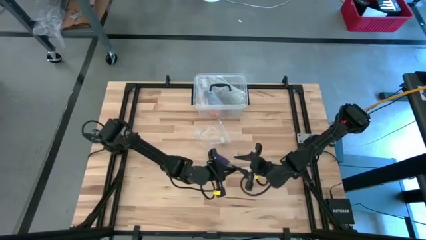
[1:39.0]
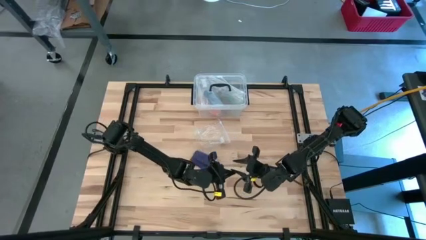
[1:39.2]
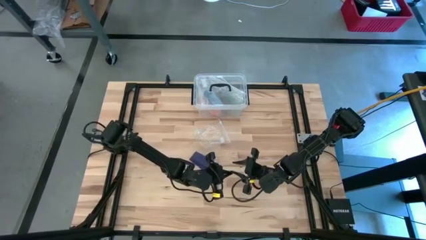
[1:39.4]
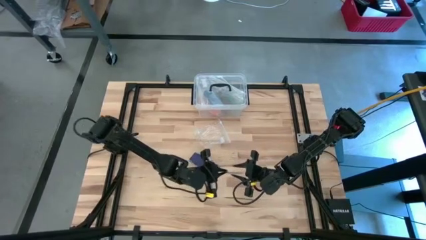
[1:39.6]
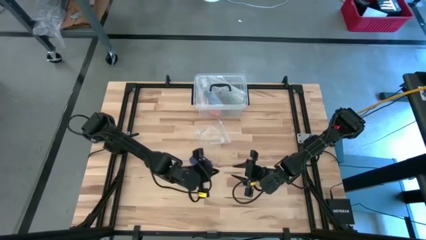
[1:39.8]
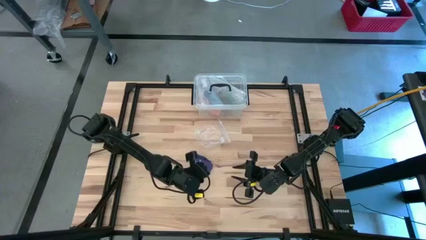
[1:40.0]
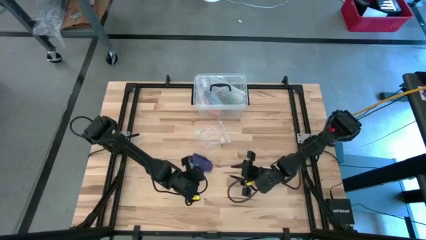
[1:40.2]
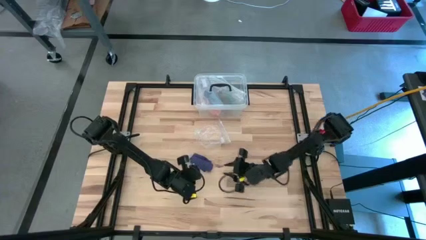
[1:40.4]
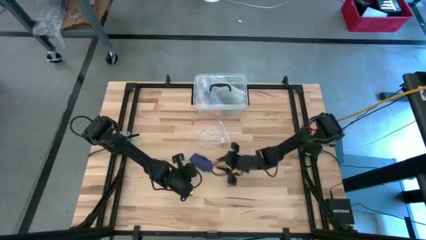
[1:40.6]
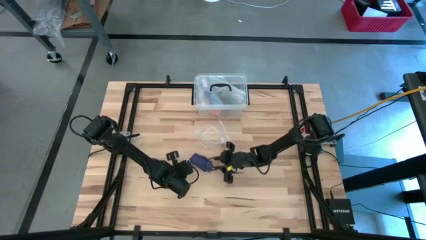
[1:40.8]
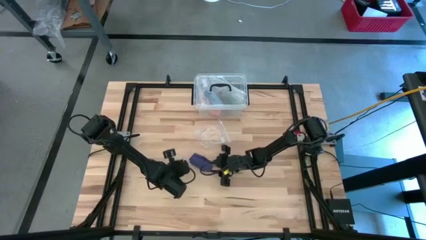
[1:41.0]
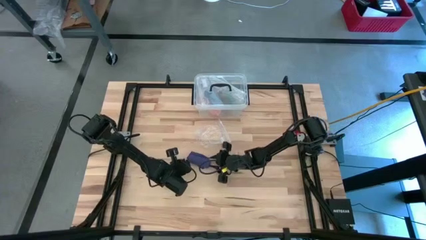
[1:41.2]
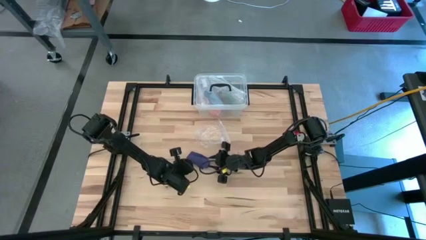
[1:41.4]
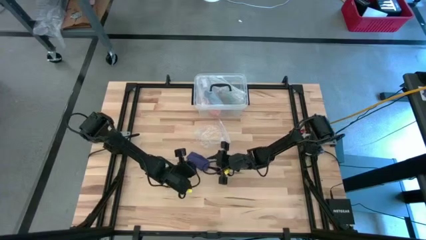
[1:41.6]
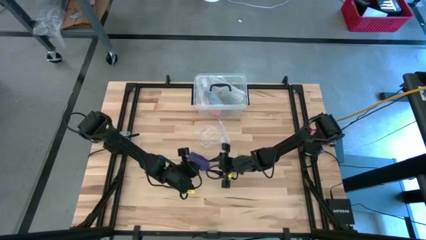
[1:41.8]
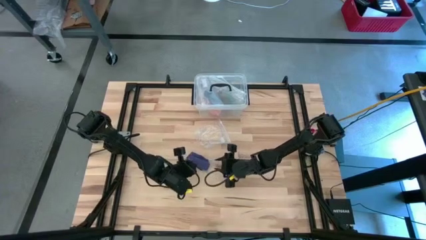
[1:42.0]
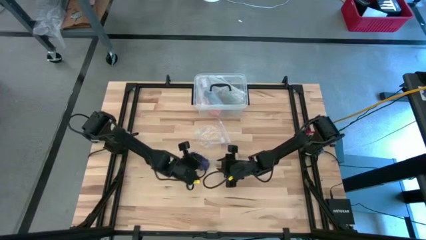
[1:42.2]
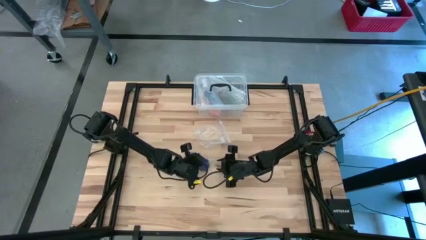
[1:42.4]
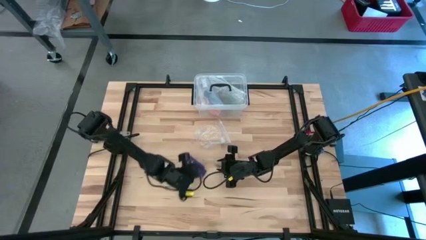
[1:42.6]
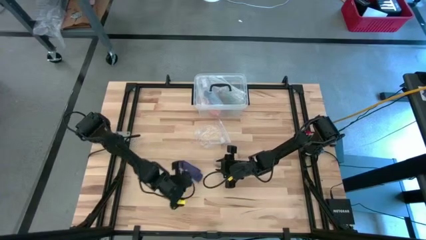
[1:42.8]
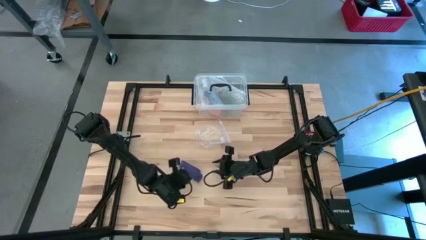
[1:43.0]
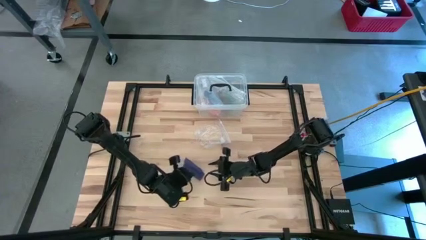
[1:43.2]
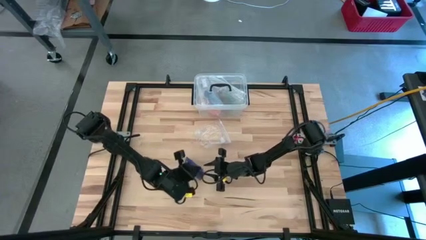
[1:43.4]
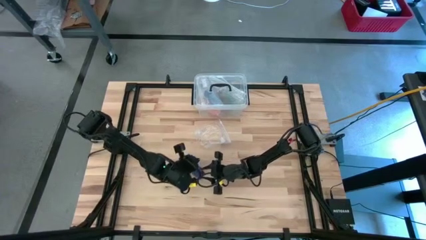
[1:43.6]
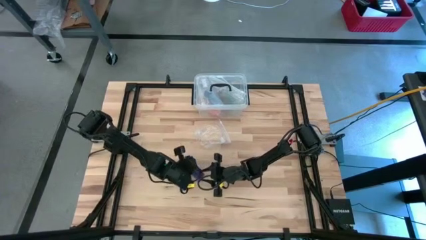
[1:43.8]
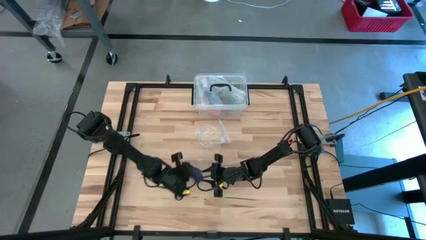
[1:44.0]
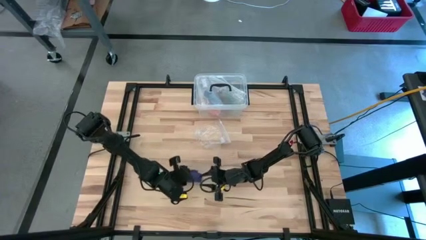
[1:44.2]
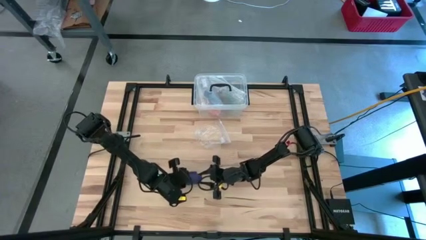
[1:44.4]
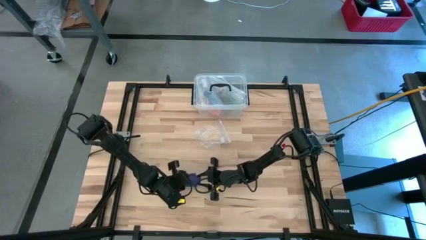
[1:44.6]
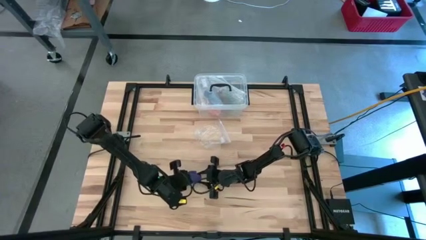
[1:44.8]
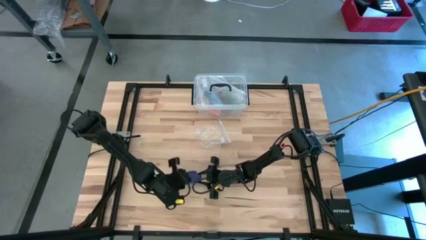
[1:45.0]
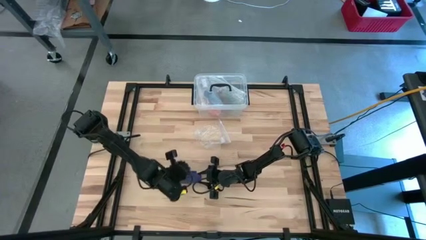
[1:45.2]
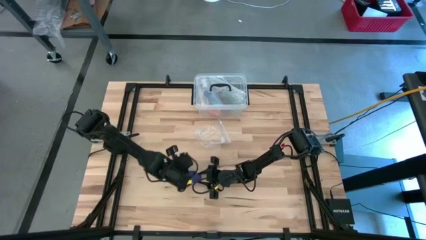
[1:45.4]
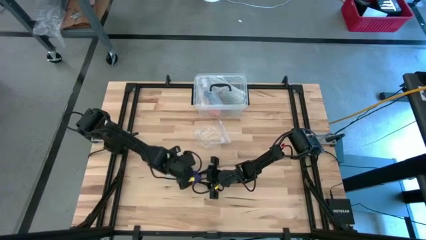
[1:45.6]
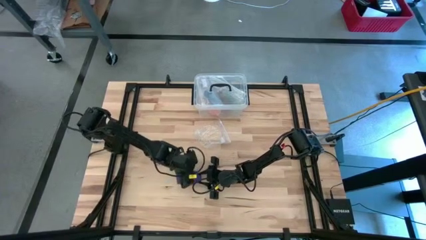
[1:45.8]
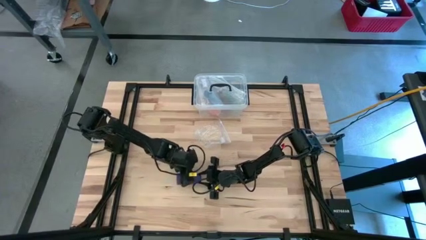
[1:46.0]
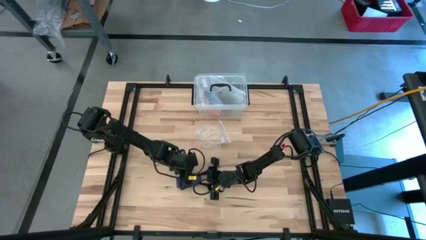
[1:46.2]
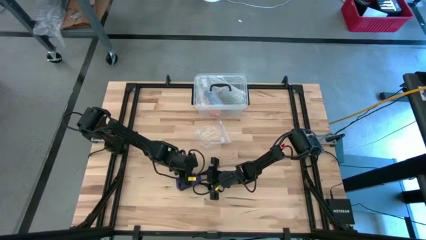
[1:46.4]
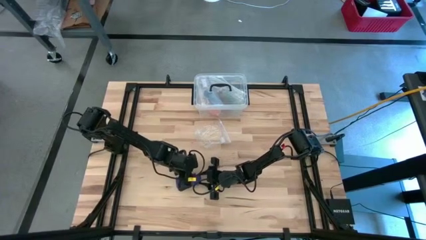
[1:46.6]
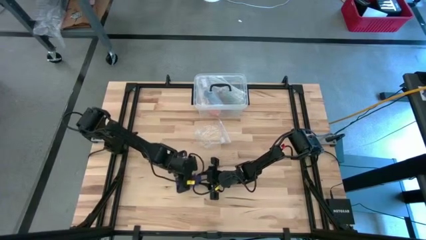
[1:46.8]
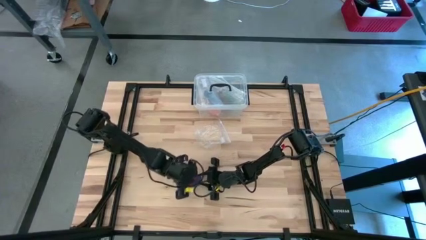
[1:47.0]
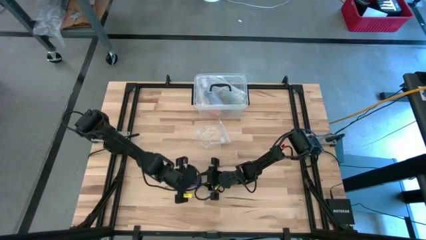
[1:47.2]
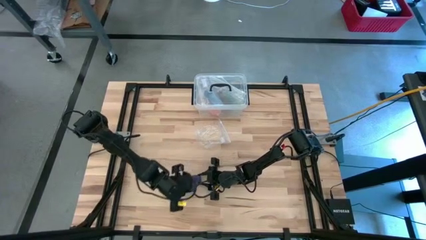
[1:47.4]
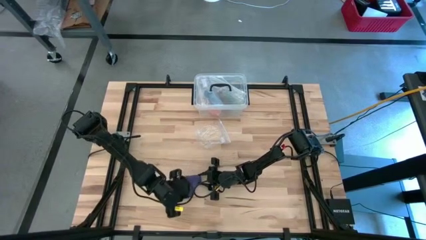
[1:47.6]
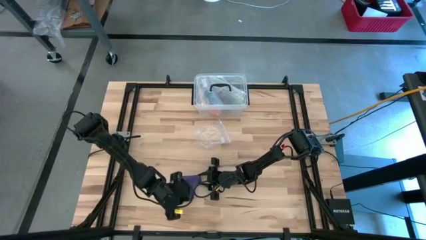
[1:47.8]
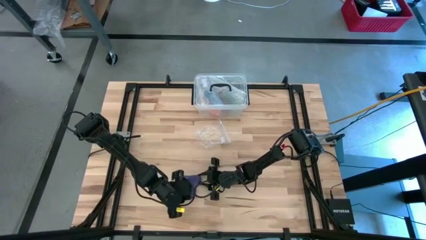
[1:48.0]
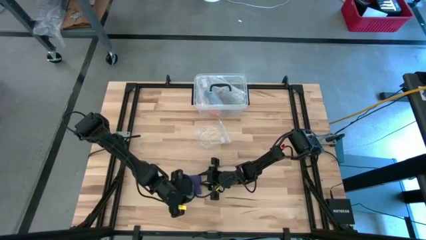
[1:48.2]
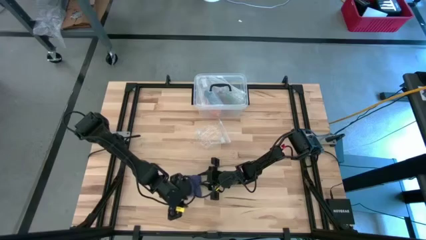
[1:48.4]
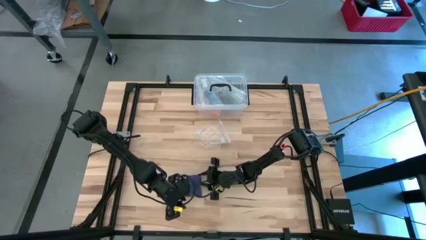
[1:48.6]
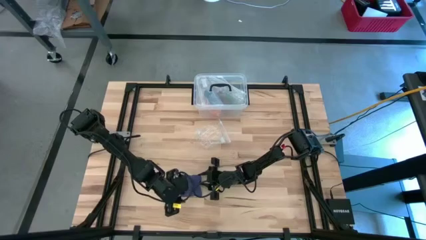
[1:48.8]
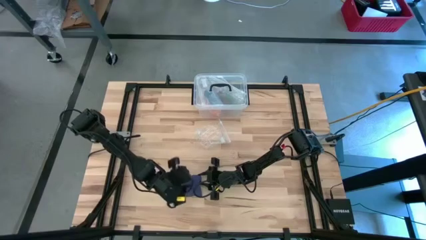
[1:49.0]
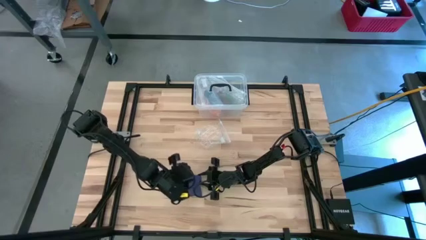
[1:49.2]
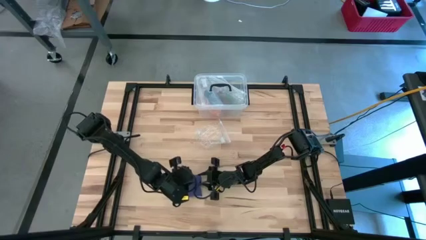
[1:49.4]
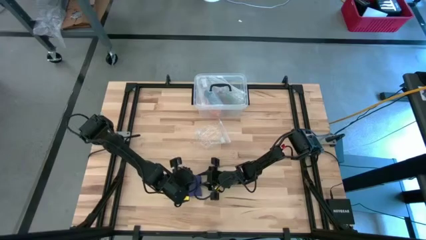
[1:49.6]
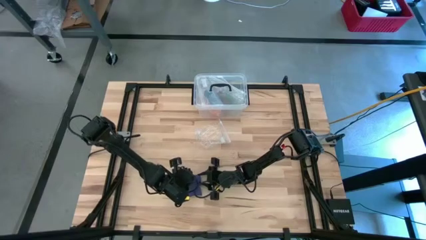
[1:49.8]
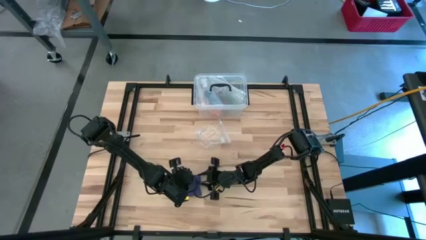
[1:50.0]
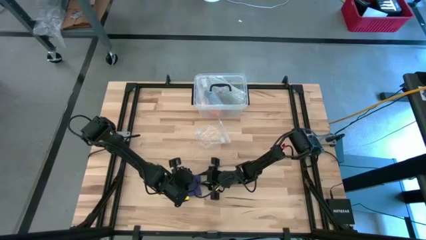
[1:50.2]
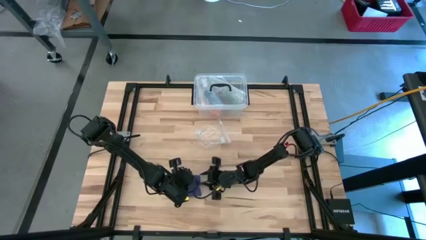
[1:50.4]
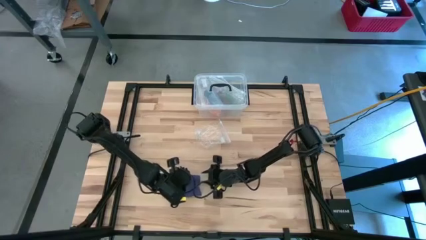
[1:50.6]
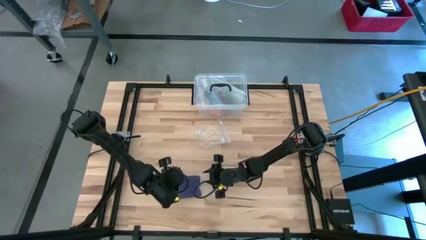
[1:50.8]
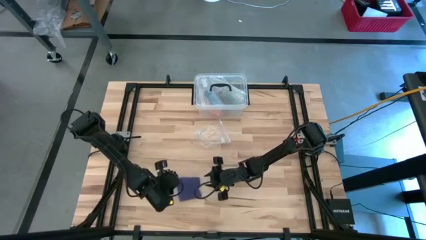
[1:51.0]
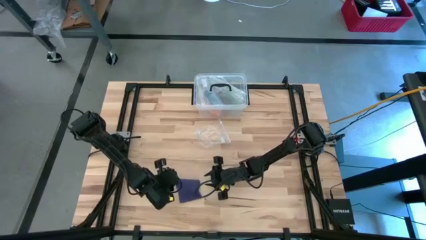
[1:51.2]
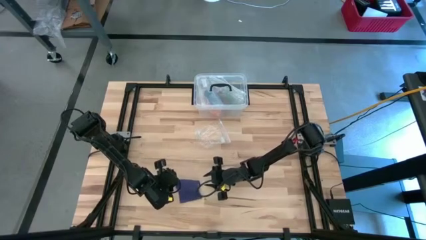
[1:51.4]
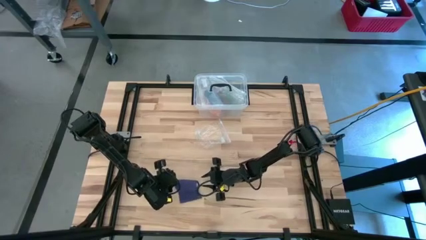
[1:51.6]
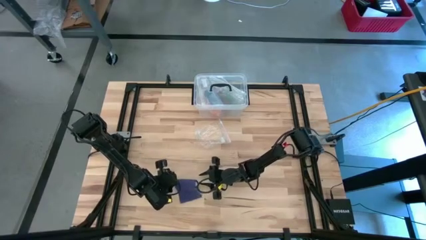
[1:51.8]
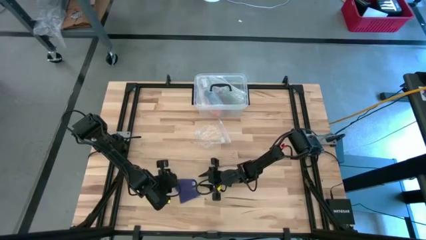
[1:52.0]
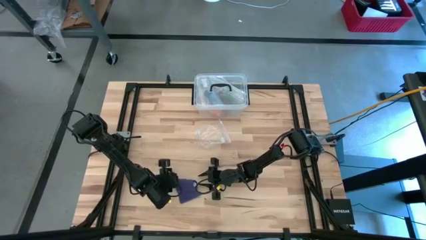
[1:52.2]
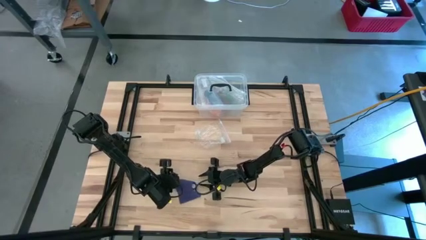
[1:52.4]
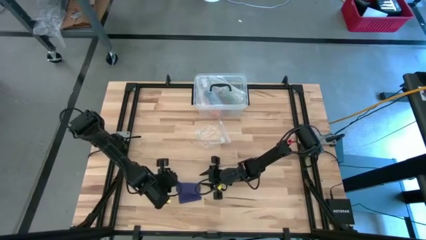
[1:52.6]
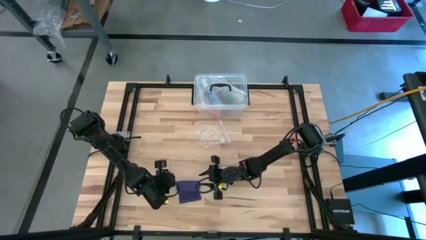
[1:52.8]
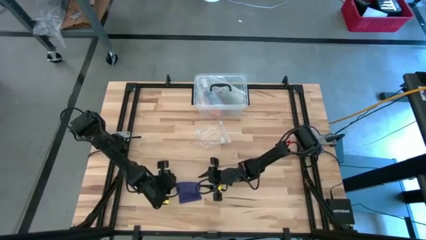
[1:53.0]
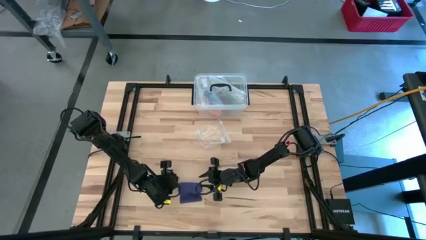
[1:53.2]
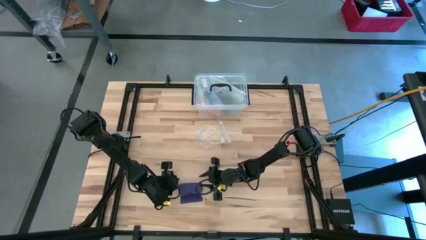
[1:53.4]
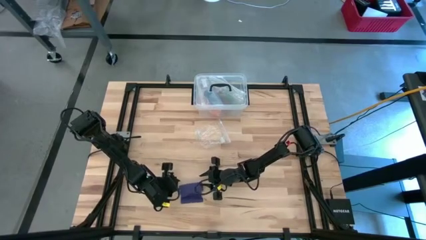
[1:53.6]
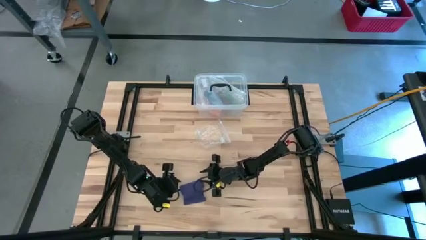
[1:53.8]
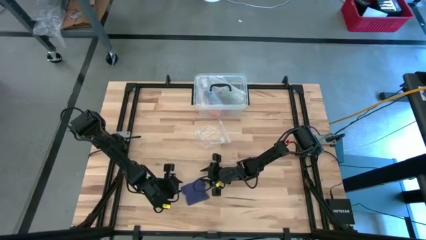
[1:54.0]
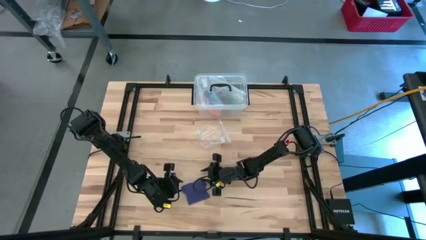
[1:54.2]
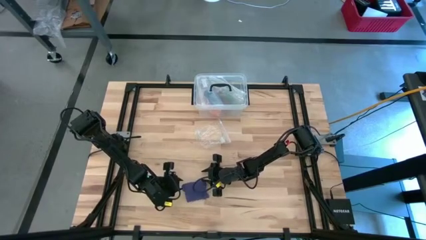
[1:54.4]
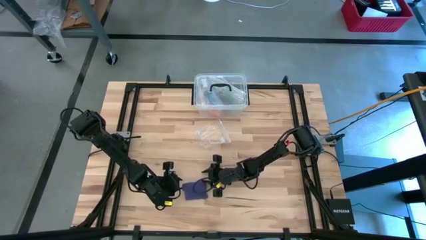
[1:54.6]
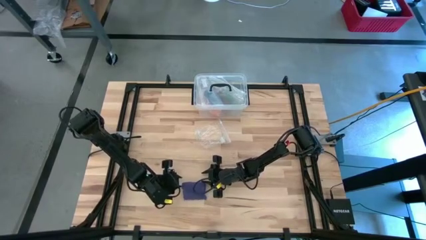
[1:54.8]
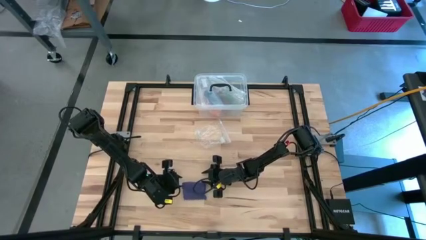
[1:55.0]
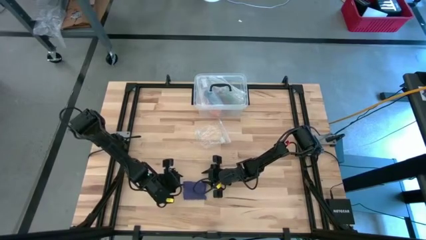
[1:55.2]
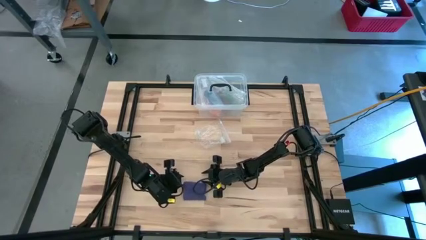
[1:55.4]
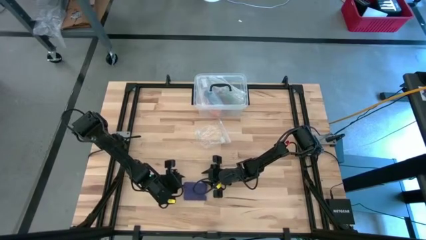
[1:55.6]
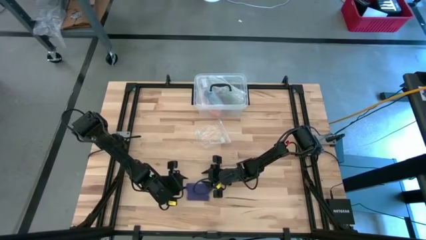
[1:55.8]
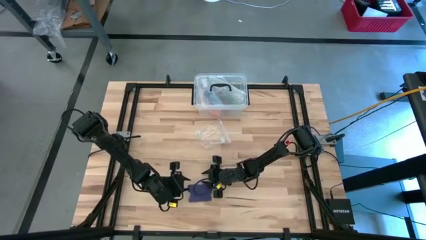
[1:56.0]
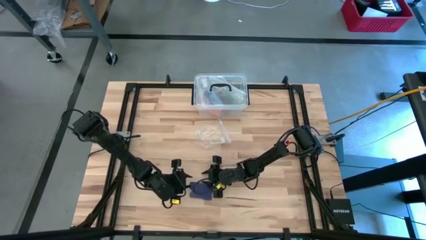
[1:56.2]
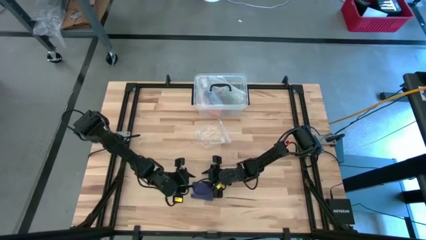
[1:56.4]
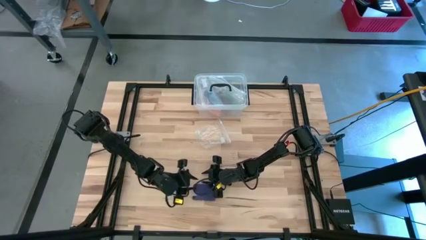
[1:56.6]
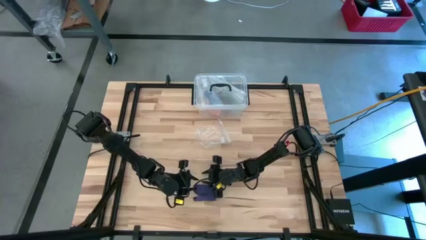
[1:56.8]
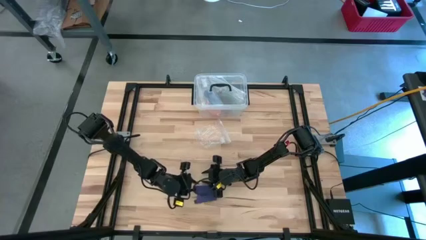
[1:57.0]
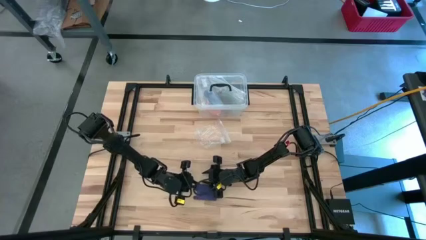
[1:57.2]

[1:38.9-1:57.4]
Task: Roll bandage
Roll the blue bandage
